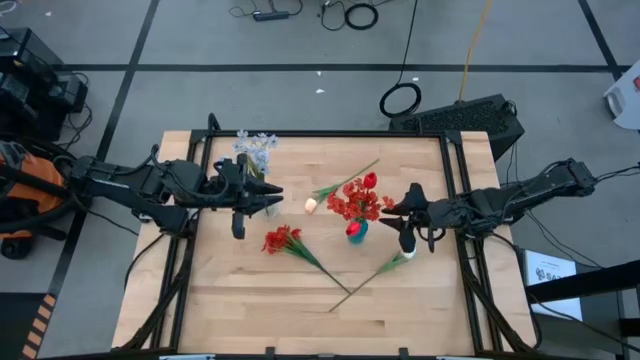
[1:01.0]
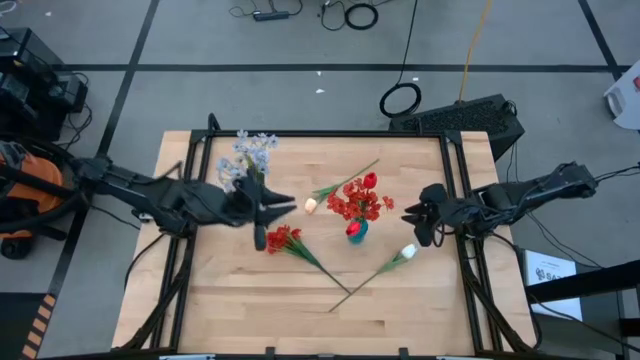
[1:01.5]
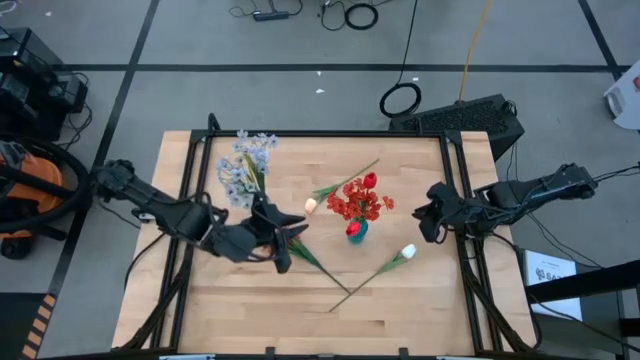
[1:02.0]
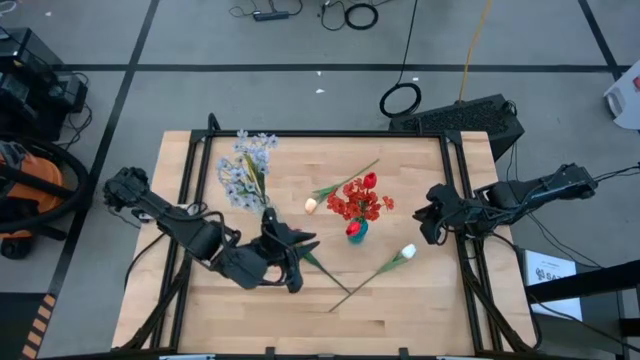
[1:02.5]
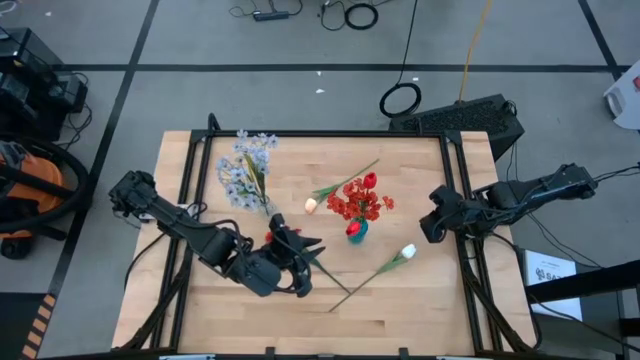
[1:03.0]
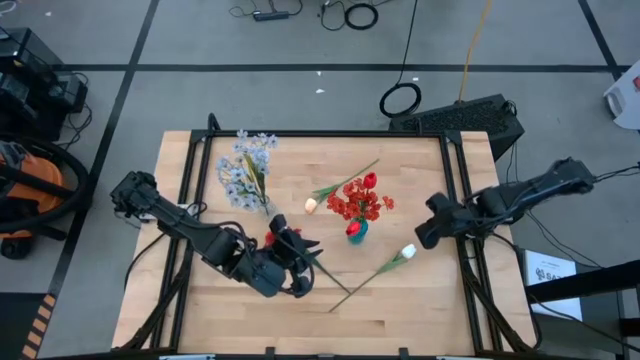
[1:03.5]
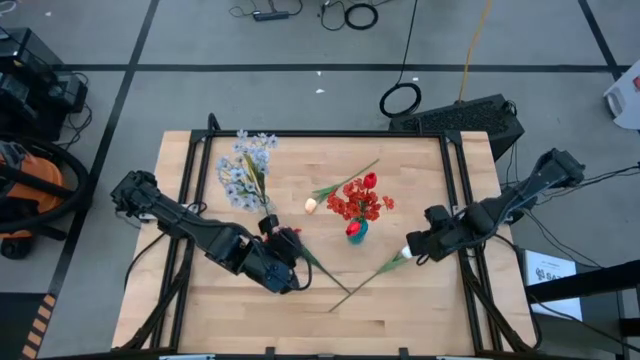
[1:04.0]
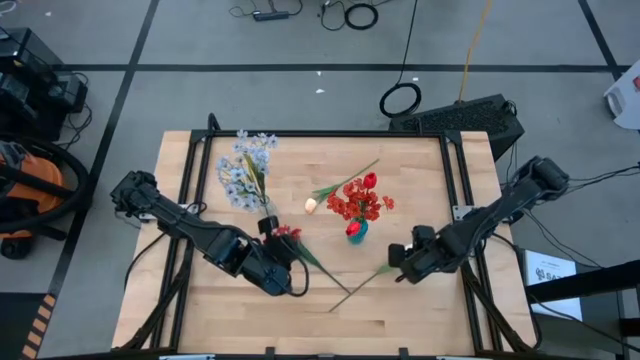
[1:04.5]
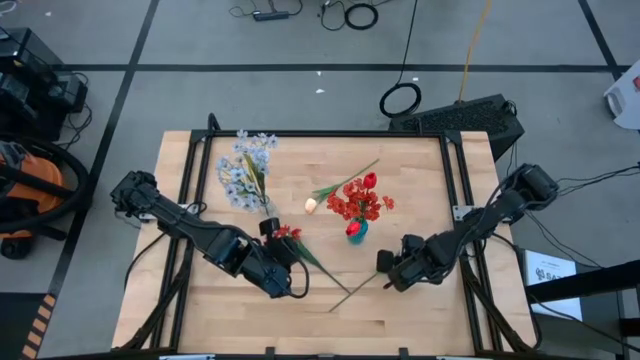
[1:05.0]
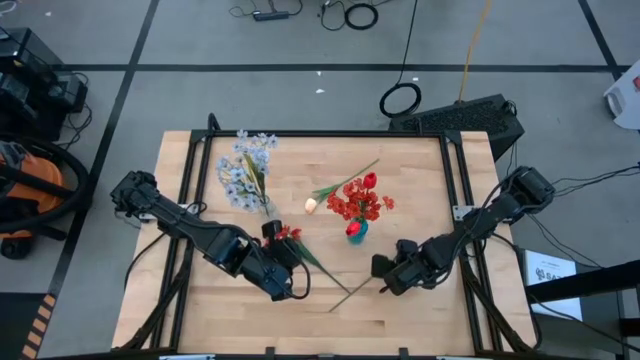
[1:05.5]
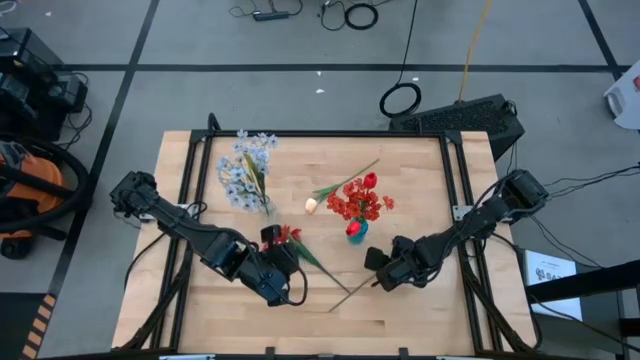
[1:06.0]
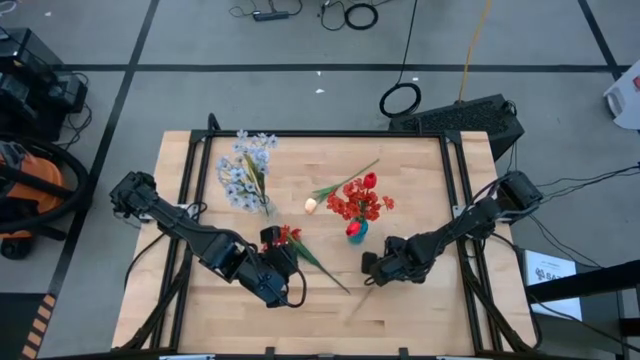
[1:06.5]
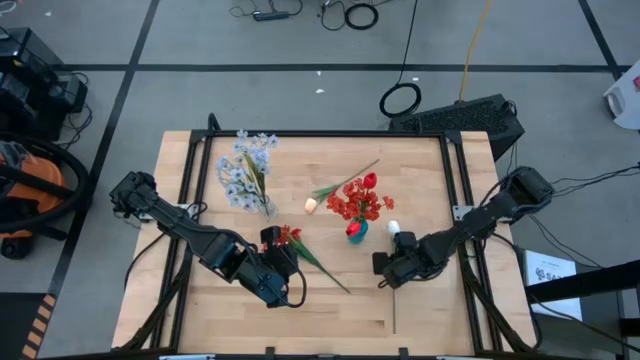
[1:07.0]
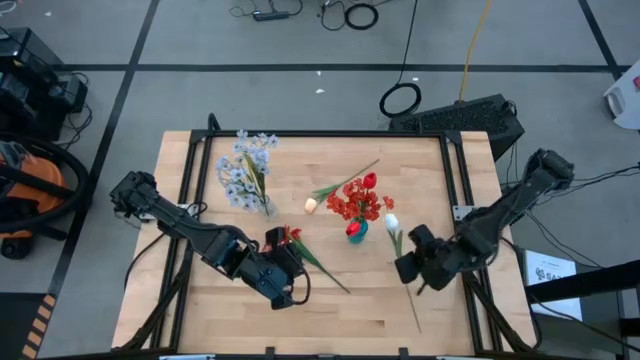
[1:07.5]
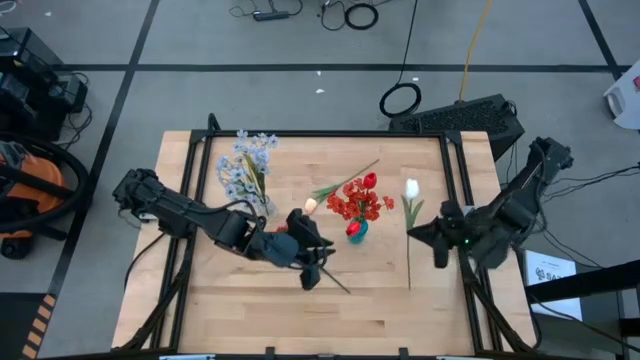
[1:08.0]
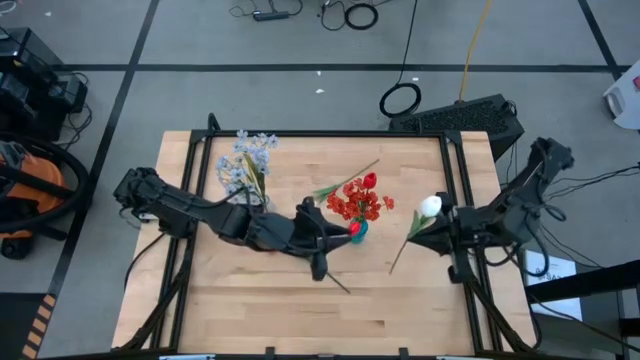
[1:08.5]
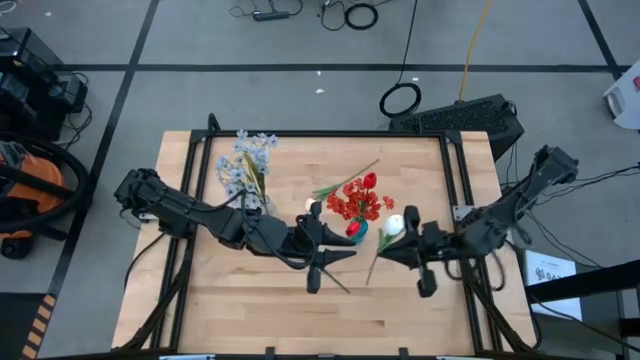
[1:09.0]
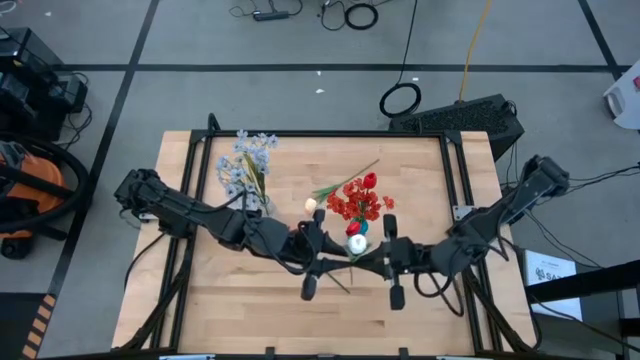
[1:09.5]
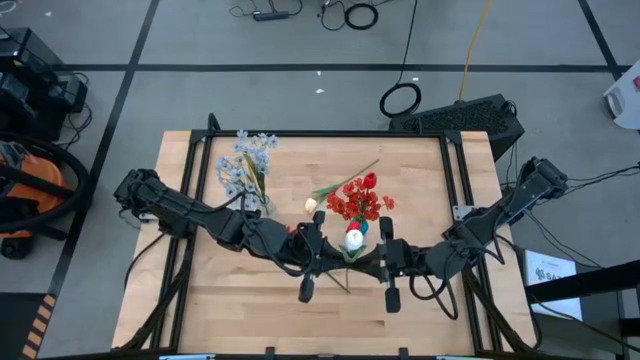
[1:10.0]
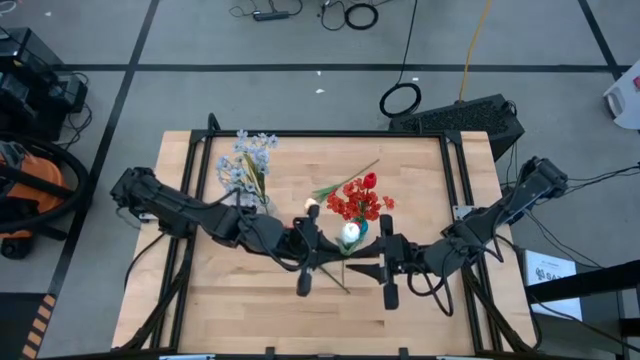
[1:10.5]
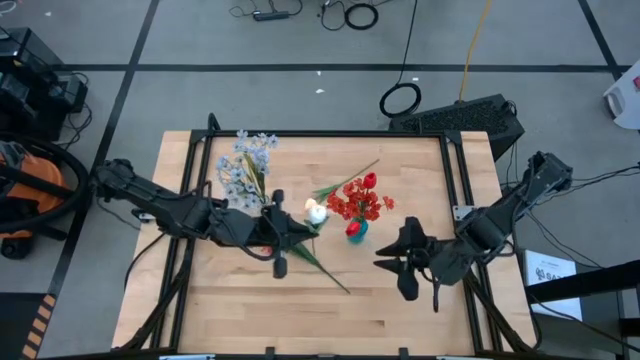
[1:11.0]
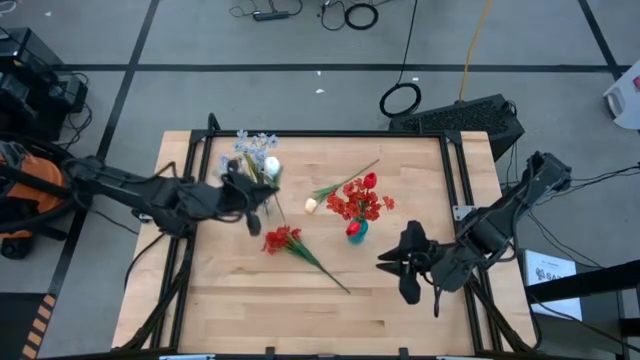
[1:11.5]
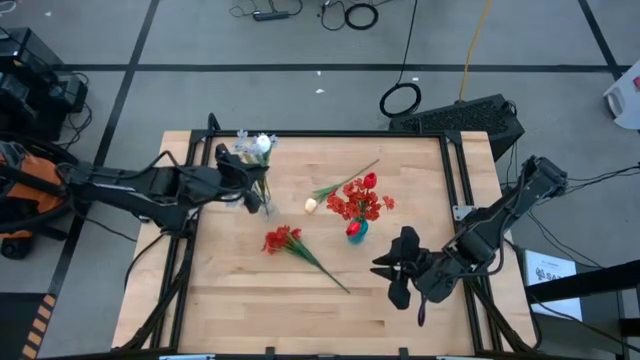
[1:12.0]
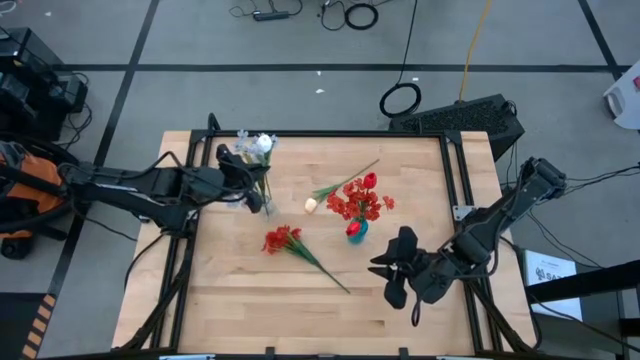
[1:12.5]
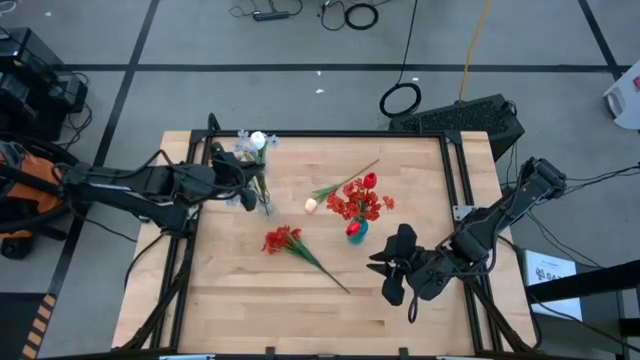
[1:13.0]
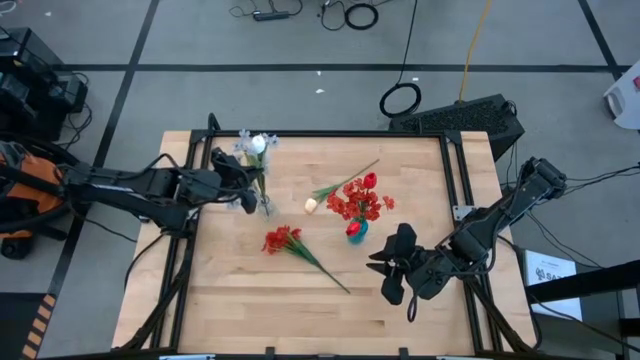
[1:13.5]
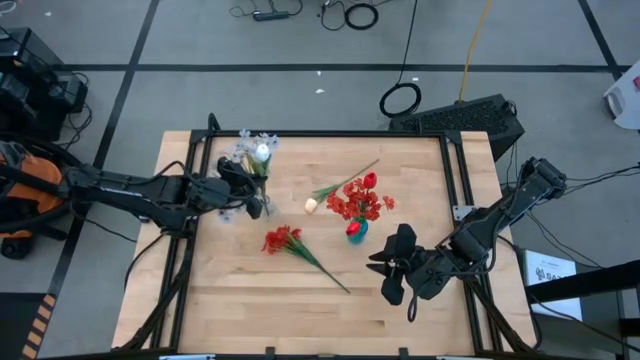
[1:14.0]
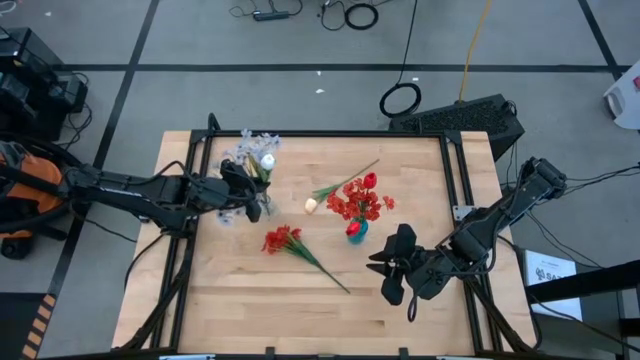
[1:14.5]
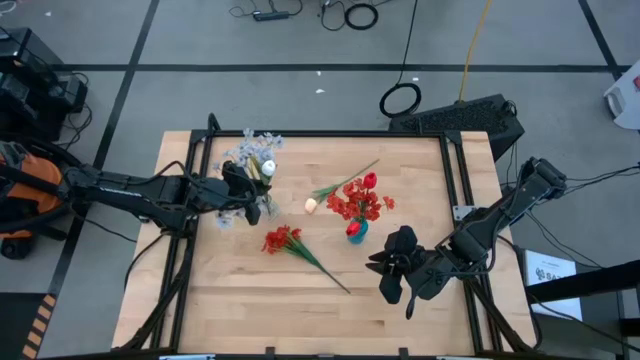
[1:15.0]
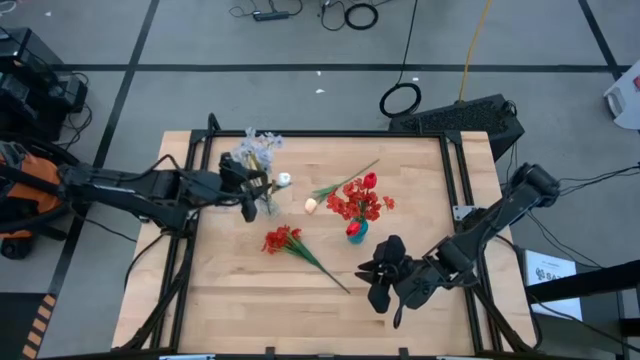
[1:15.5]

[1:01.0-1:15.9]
Task: Sort flowers into vase by color
Put the white tulip into the transparent vase

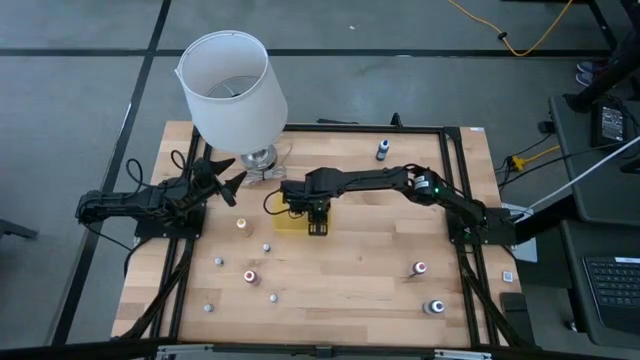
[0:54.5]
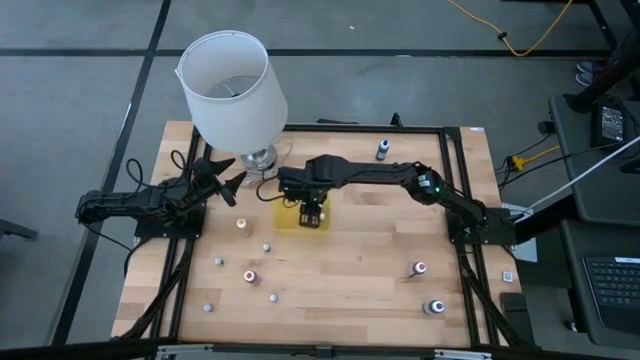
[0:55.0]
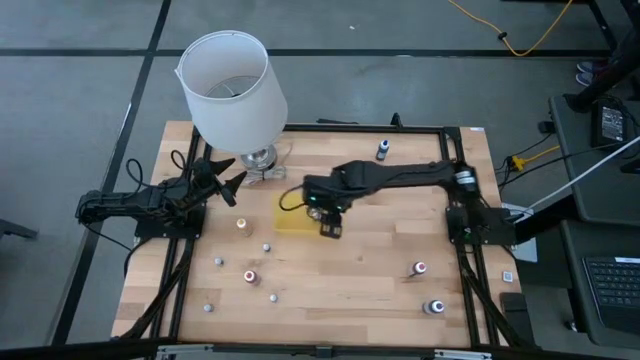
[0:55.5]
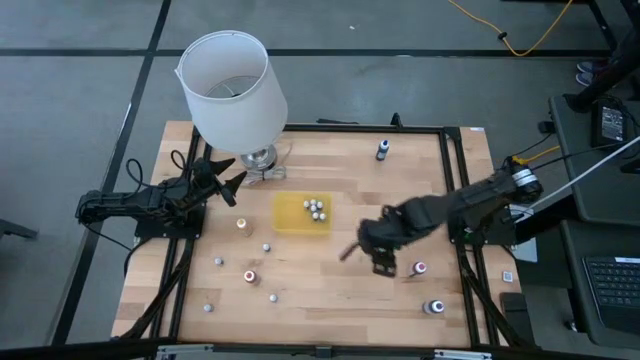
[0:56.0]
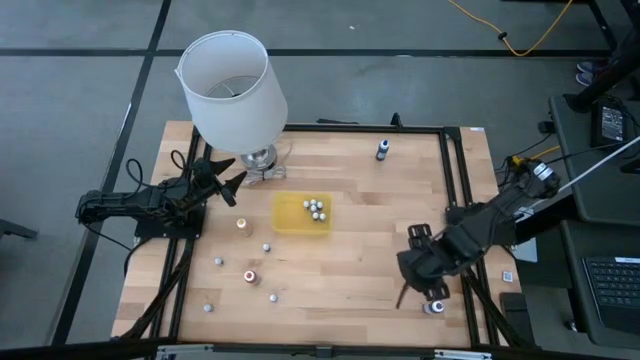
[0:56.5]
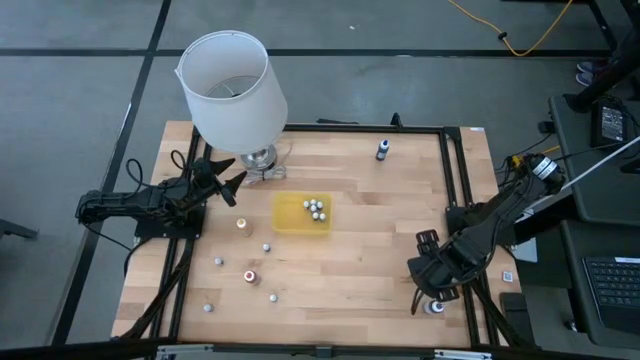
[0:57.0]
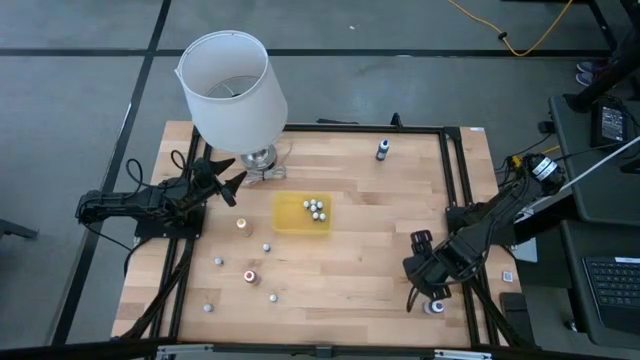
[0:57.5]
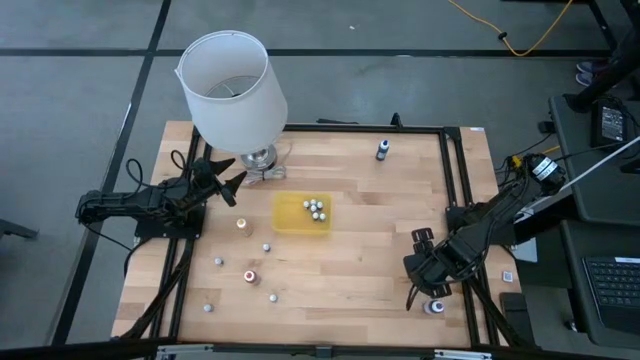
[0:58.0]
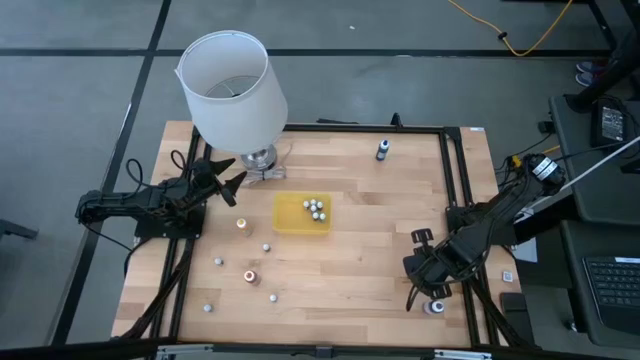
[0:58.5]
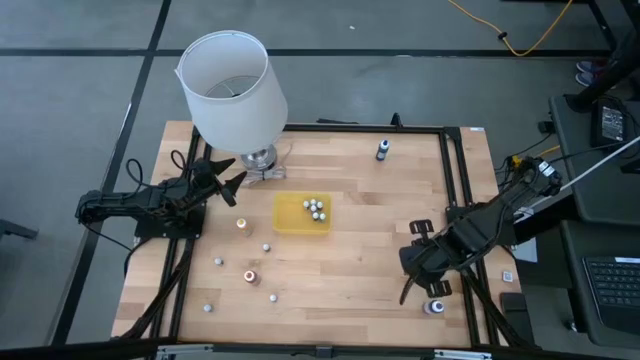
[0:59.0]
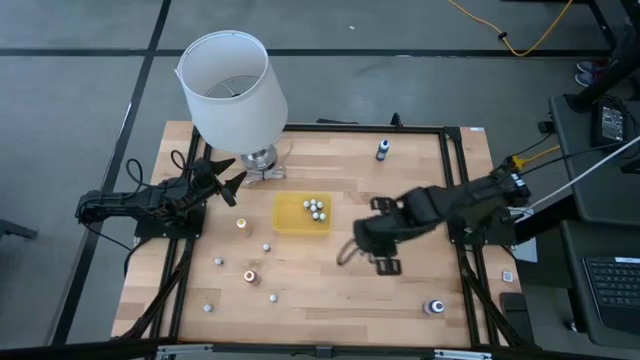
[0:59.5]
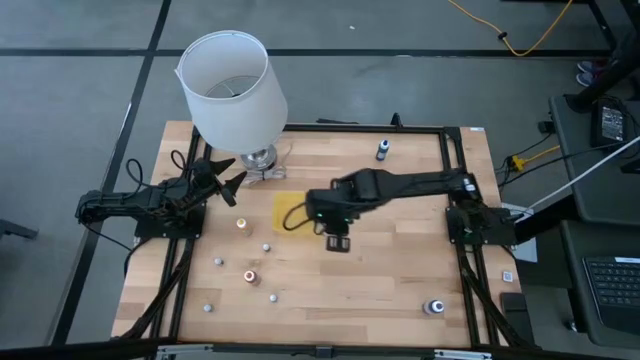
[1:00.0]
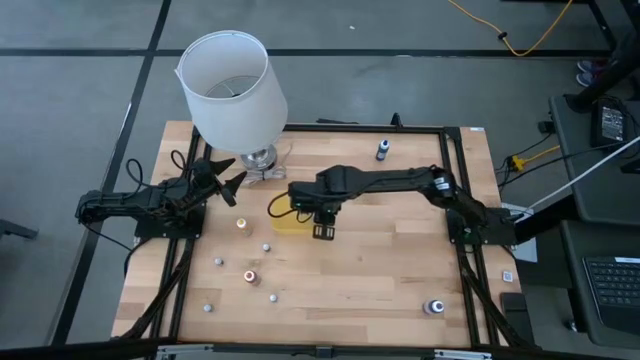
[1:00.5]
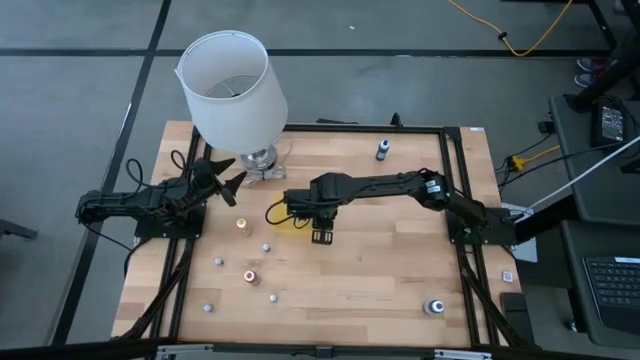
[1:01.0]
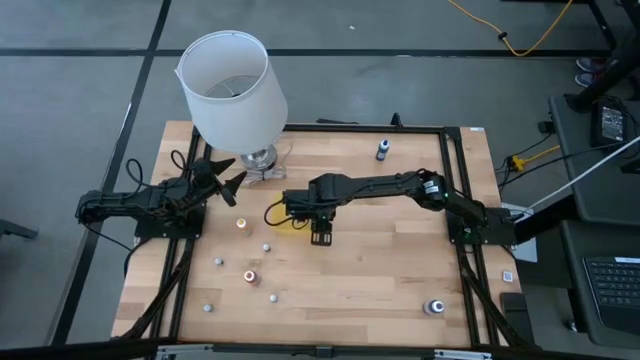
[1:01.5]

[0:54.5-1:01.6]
Task: Pick & Place food coloring
Put the red food coloring bottle into the yellow bin
